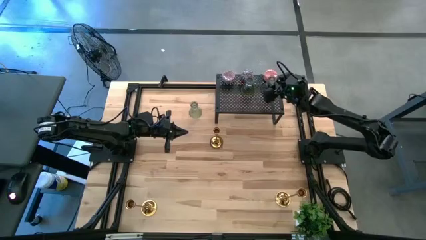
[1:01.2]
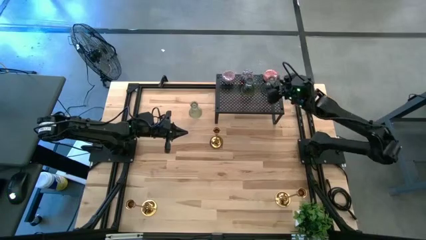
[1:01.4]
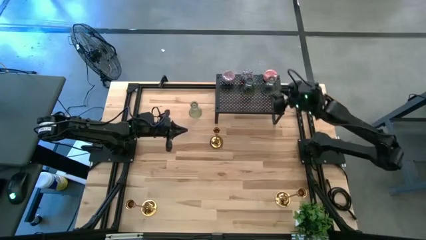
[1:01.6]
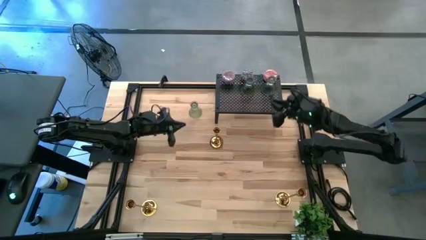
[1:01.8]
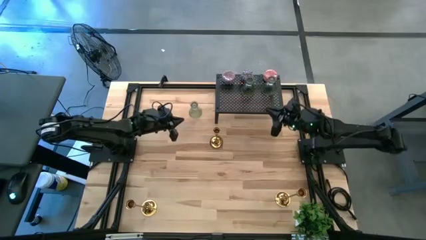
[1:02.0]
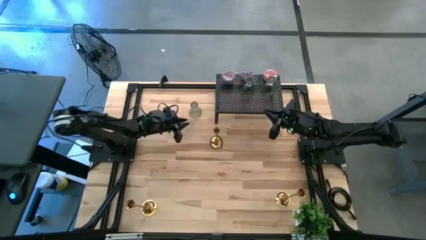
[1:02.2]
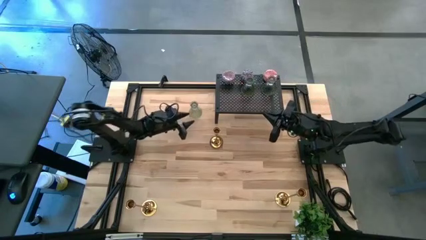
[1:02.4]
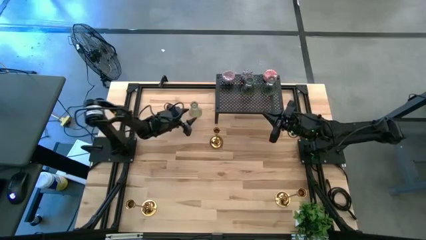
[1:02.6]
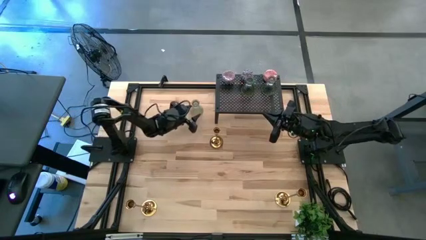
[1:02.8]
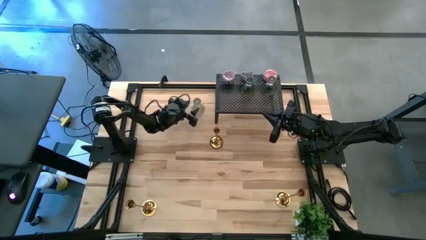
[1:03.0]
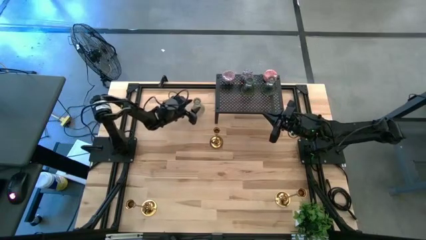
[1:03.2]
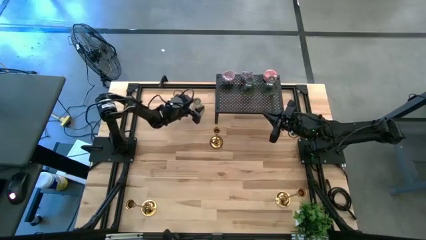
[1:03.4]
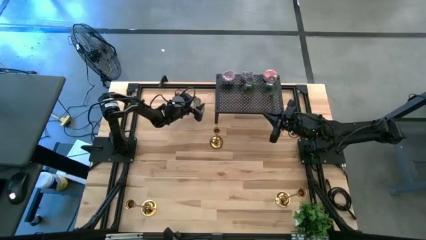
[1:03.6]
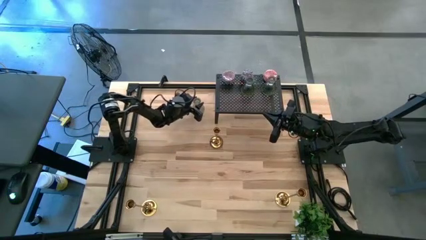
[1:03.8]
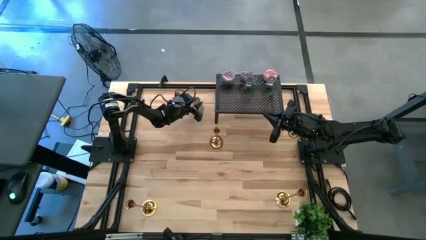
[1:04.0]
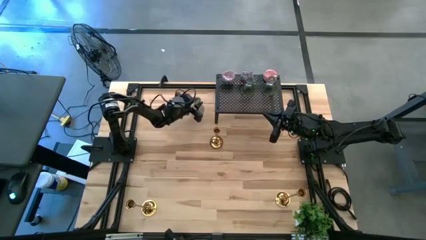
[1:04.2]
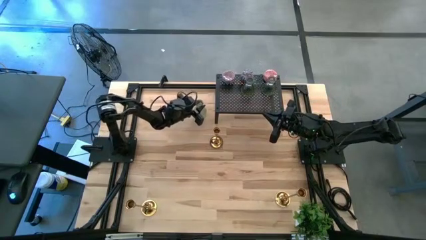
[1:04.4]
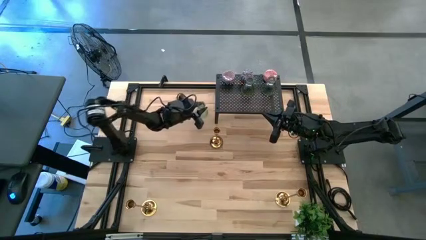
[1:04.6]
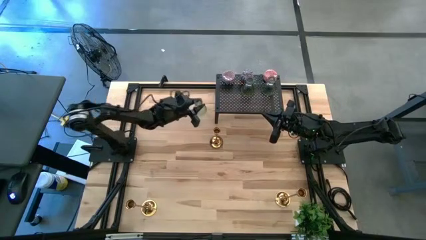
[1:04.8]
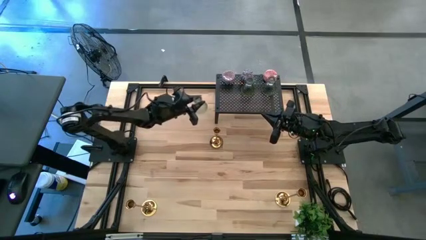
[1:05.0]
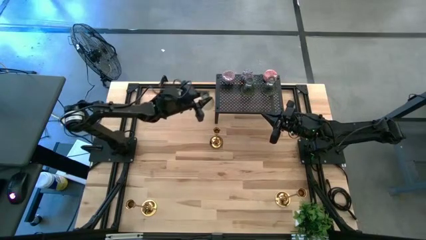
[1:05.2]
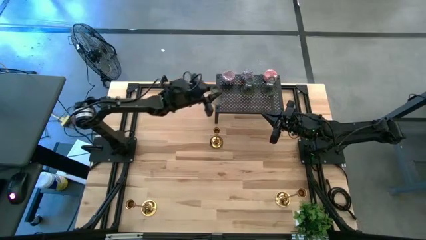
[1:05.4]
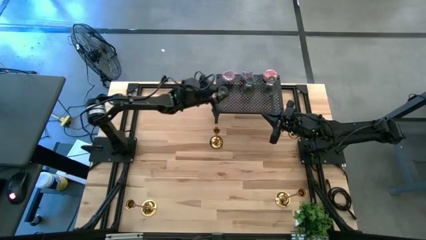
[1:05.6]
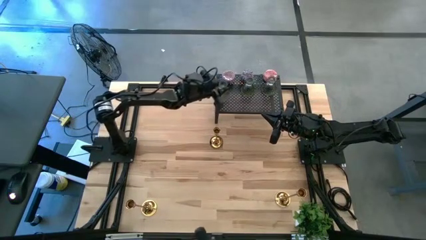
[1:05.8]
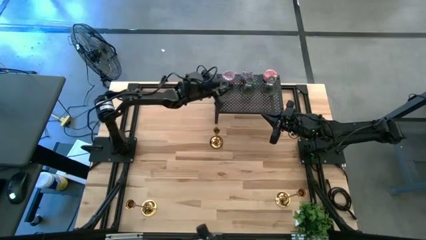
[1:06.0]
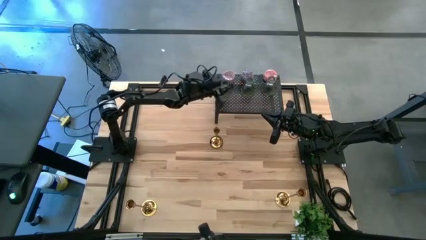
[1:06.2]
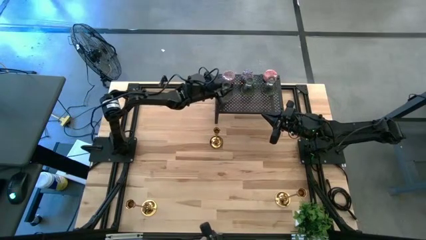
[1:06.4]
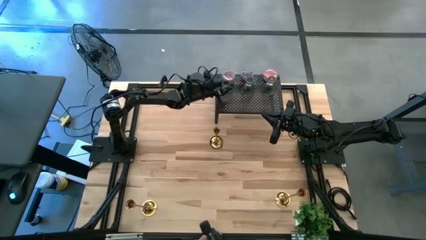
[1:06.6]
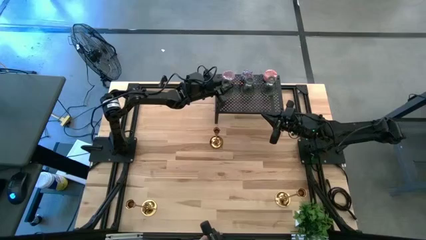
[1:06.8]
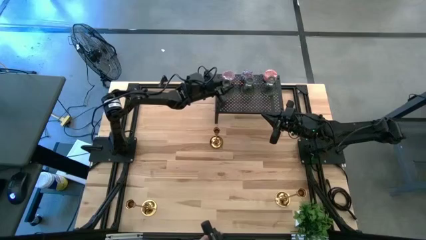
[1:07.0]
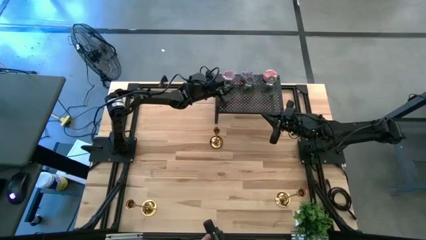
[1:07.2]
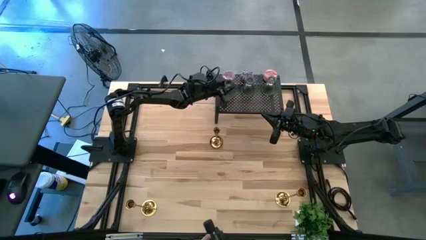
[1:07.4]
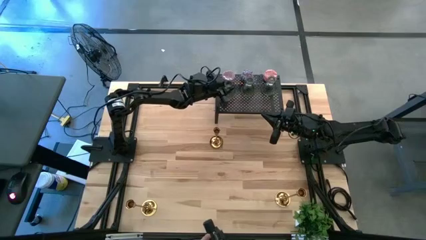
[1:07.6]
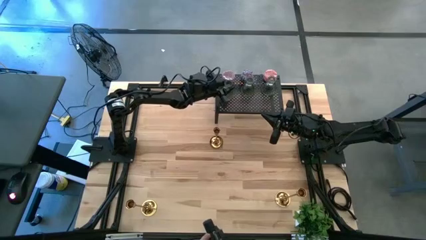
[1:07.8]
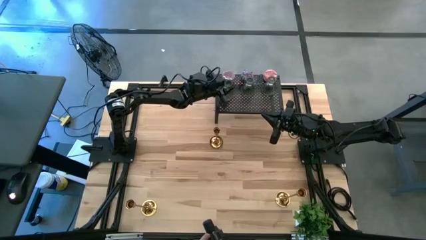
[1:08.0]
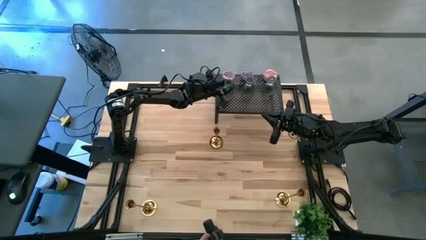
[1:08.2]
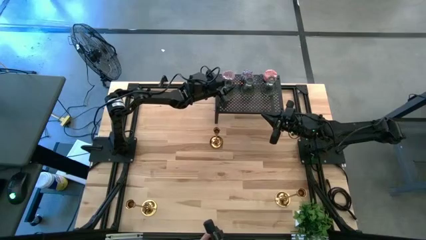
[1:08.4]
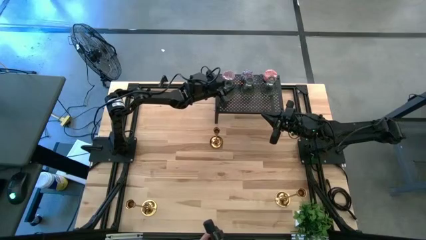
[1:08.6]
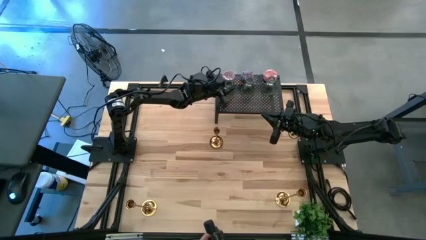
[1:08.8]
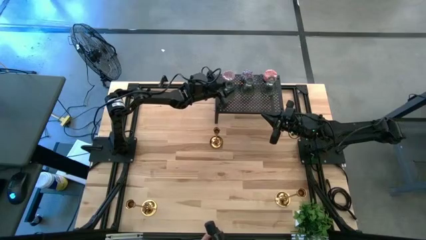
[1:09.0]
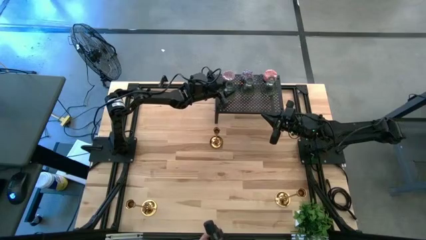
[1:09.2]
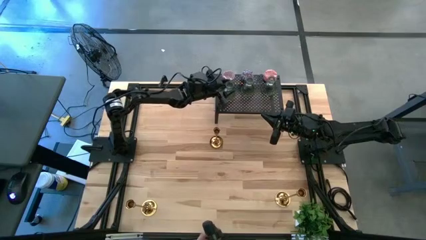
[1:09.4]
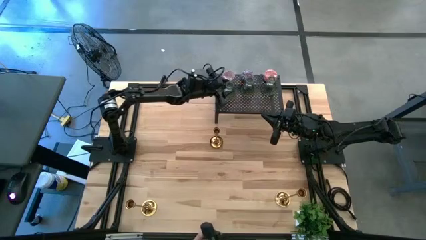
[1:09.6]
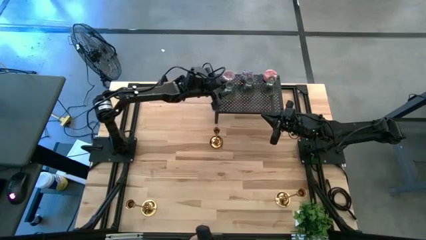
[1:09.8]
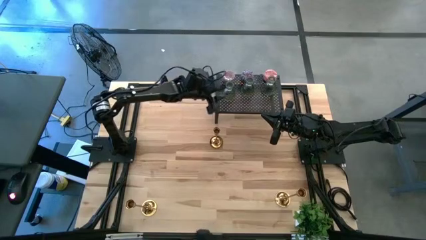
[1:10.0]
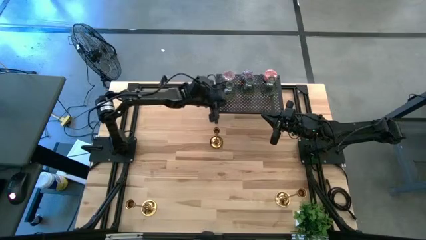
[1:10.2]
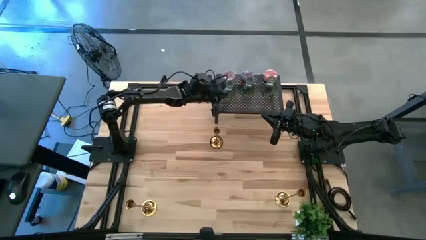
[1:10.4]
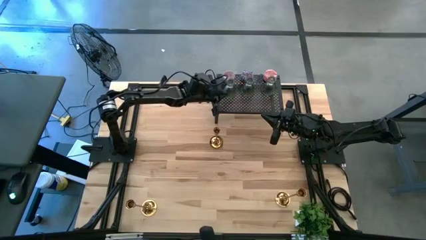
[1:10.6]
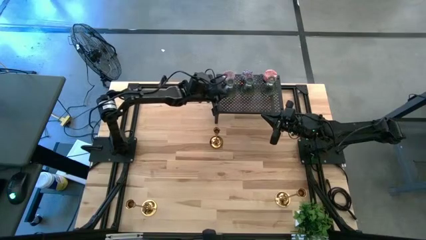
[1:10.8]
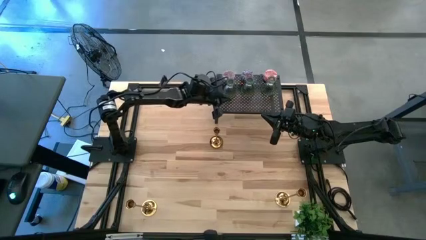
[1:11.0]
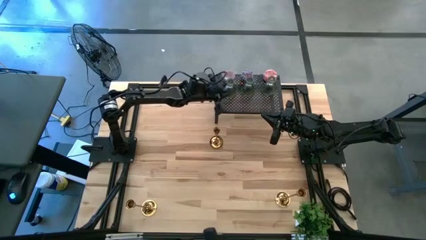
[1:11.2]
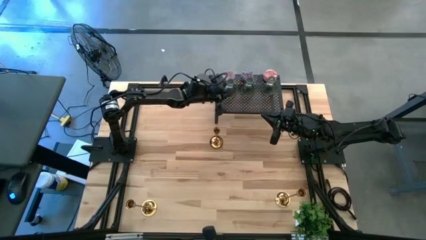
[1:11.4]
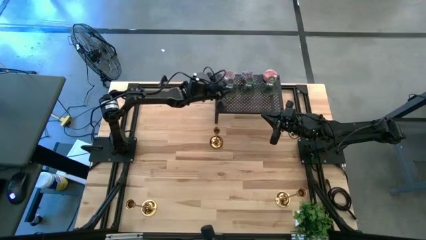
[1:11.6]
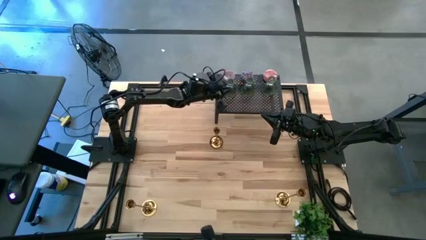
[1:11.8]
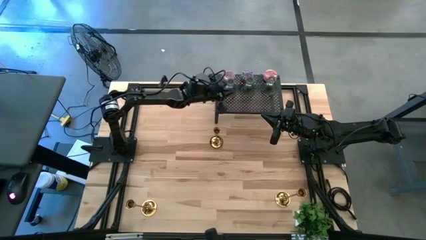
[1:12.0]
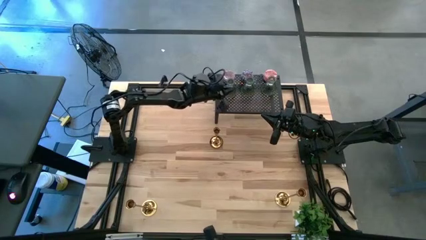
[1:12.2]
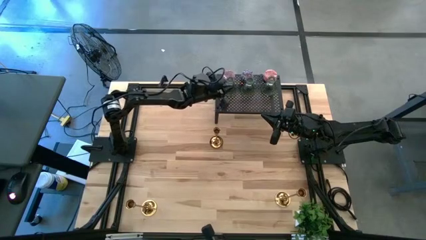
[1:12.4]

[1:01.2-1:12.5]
Task: Pick & Place candle stick holders
Put the glass candle holder on the shelf

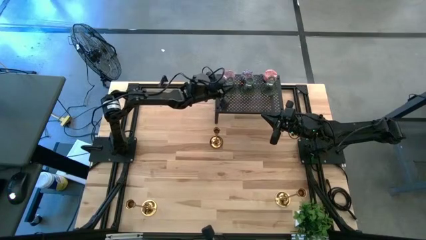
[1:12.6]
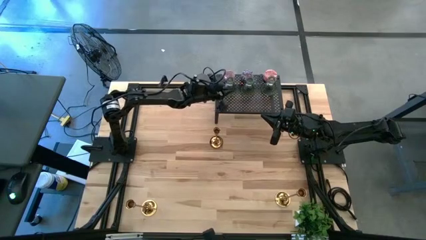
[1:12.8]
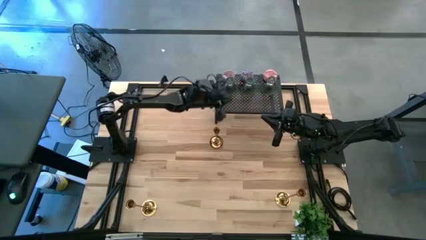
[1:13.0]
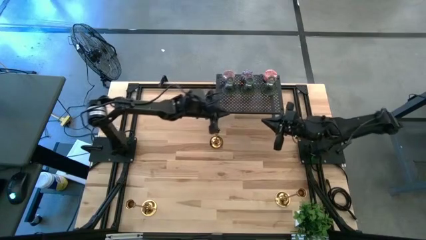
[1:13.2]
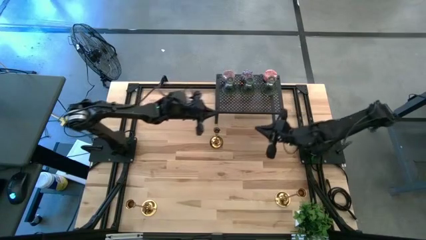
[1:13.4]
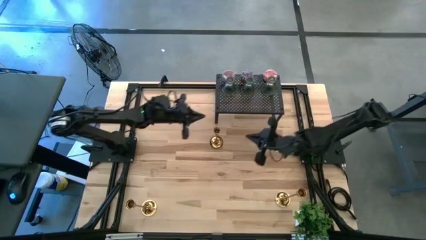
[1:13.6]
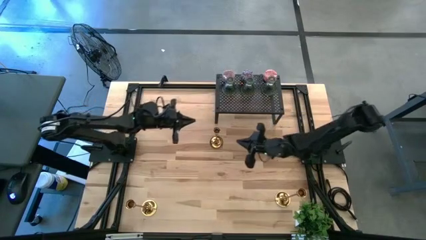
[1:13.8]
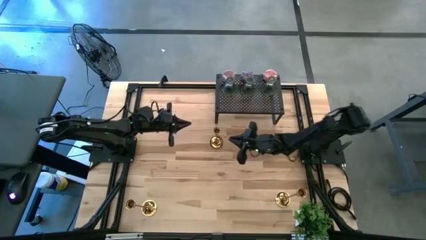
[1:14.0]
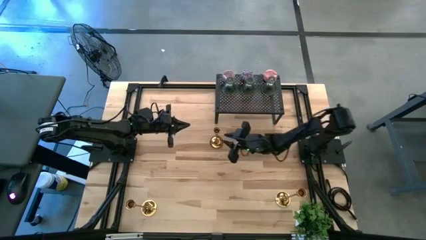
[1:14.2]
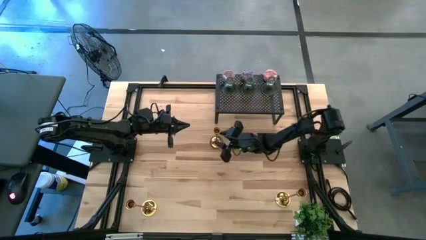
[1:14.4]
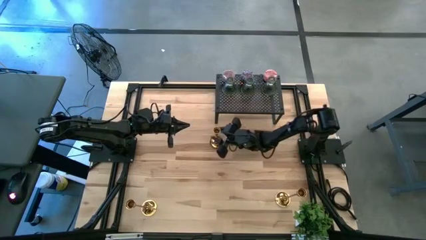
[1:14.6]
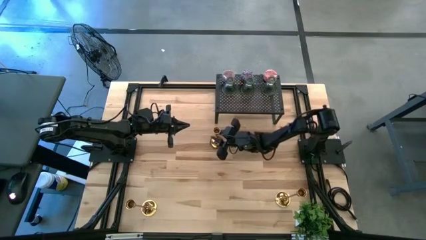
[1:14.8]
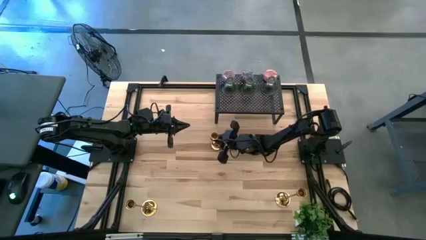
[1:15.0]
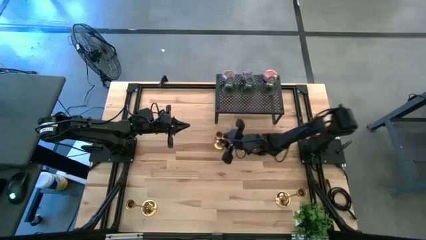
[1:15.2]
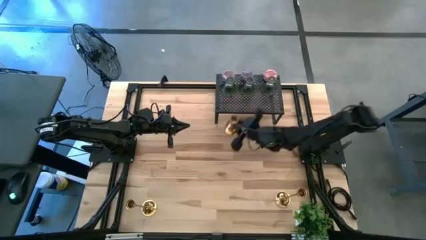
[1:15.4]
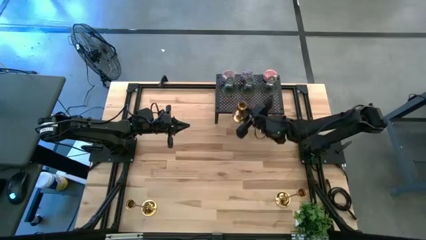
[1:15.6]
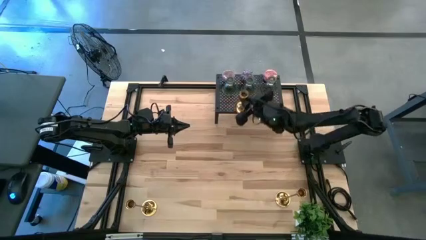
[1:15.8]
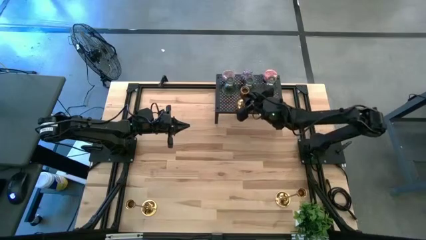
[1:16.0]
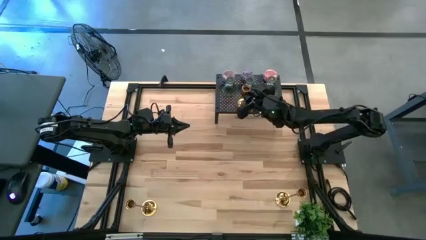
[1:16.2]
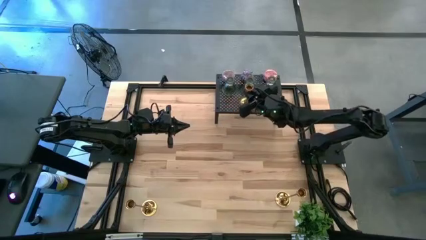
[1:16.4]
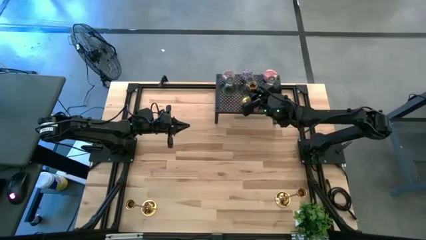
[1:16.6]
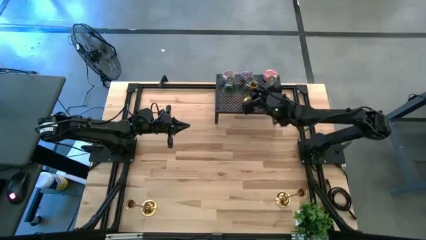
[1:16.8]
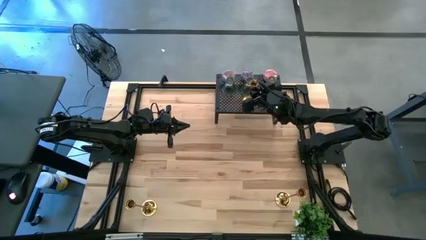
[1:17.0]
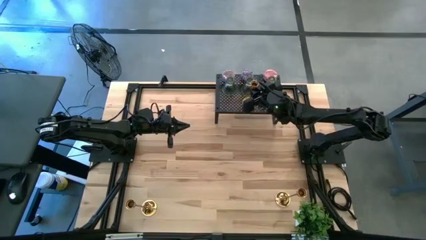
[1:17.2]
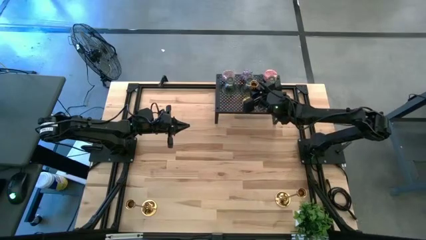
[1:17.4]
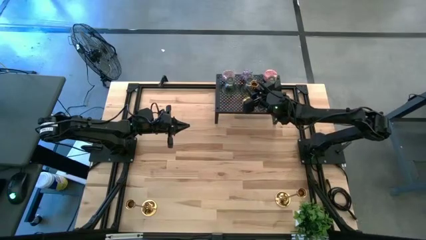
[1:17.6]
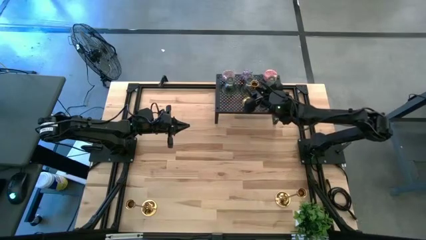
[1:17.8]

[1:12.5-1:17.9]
Put the top metal candle holder on the shelf
